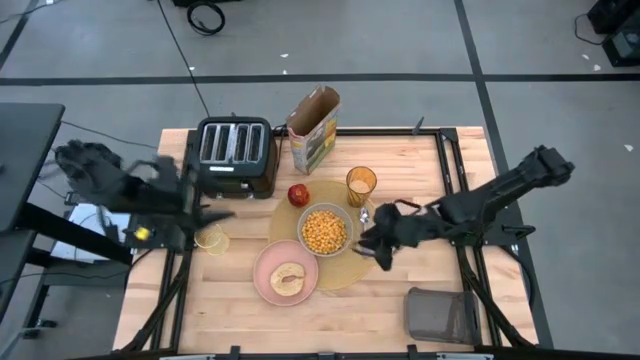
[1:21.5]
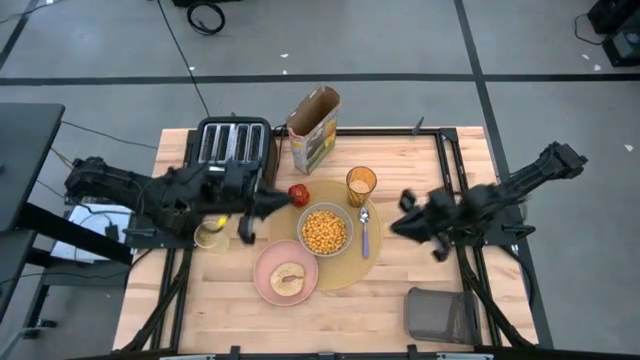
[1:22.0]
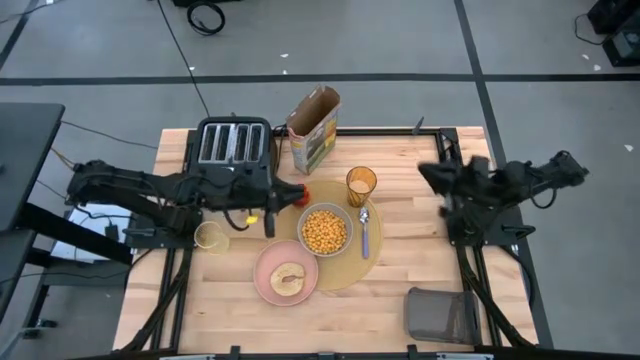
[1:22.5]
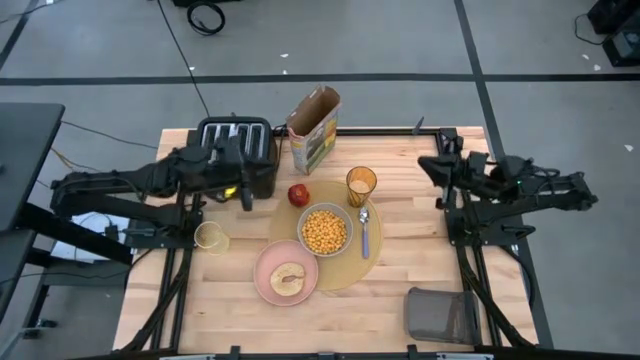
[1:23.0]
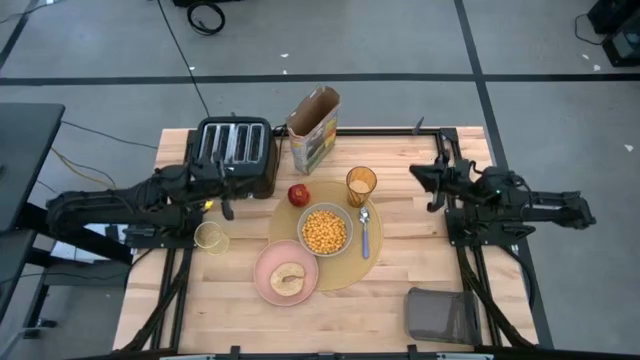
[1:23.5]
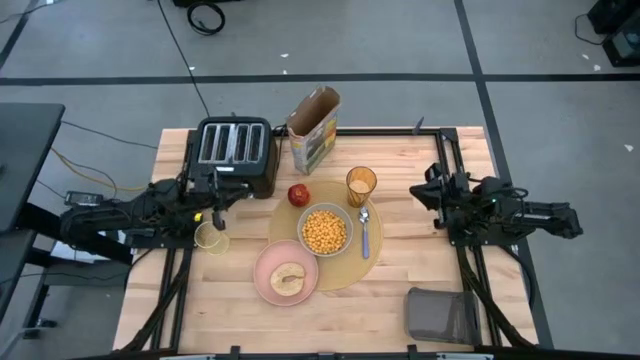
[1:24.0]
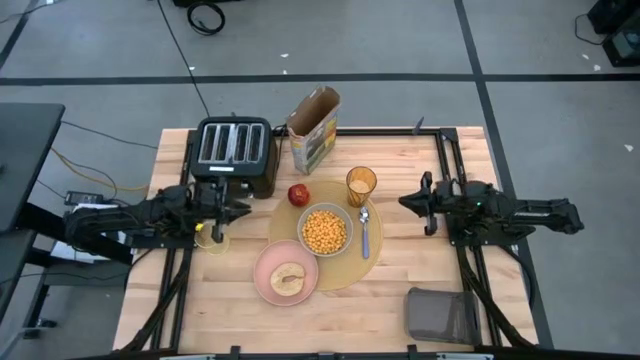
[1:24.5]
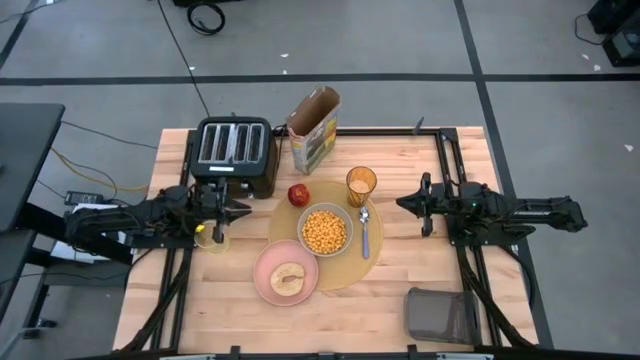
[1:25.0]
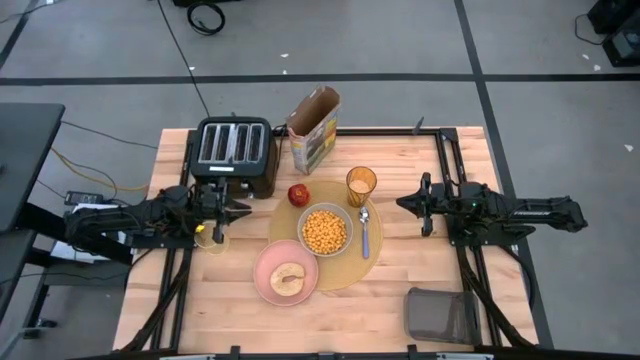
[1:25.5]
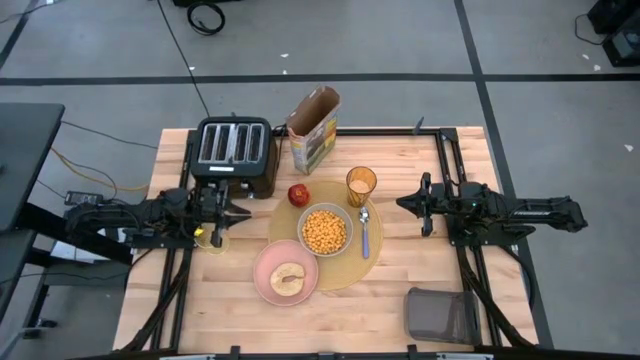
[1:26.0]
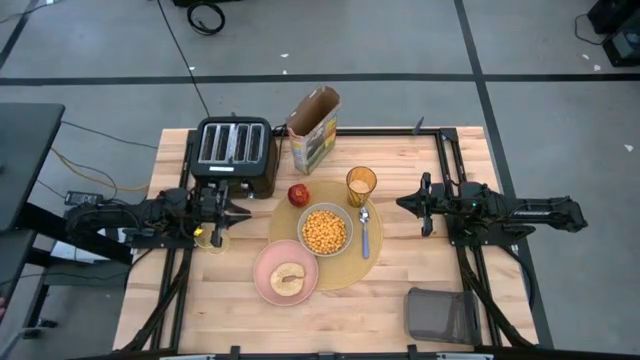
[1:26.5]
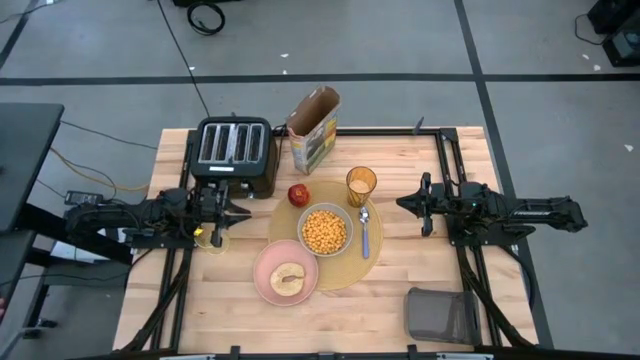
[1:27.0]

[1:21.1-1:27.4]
Task: Arrange a breakfast setting
Return to Home Position

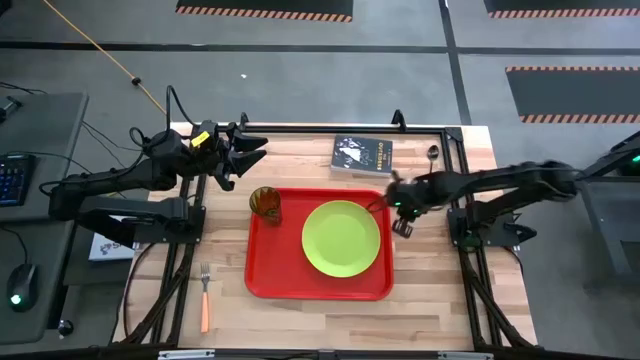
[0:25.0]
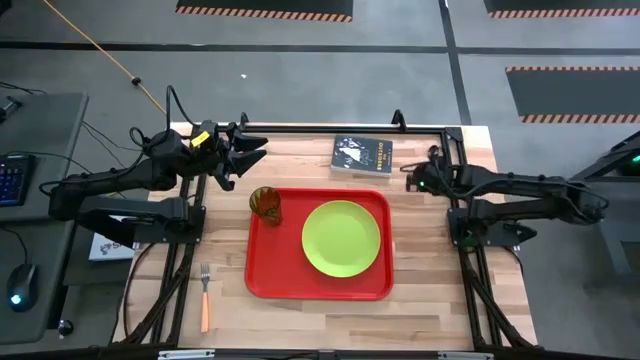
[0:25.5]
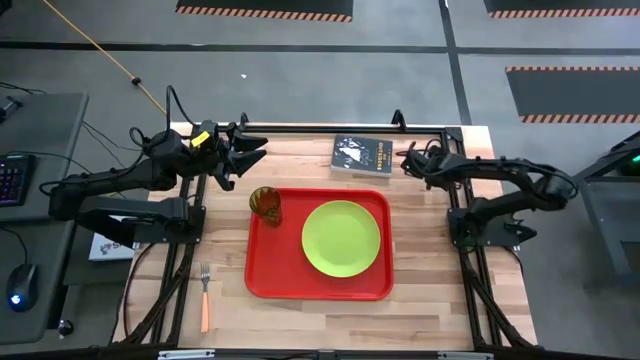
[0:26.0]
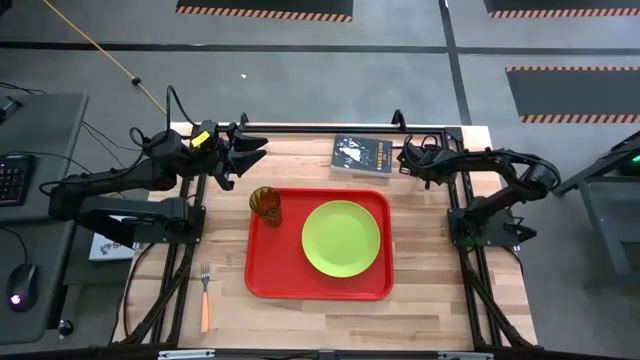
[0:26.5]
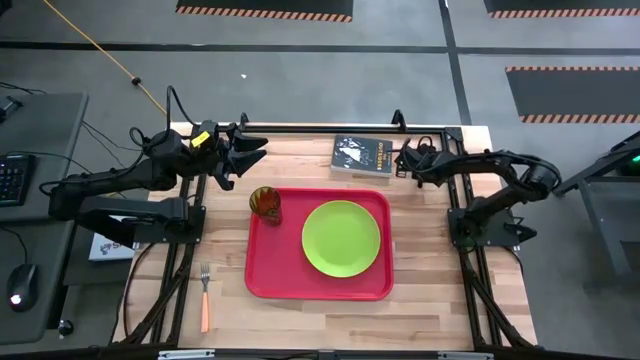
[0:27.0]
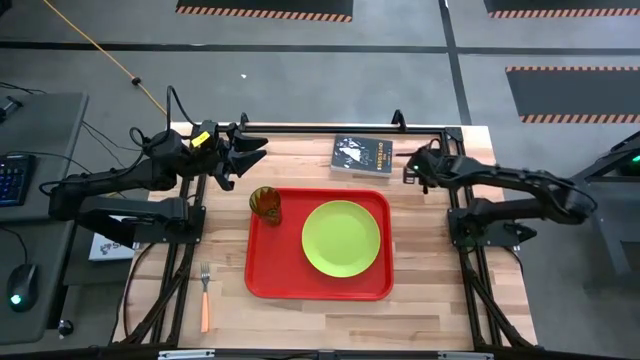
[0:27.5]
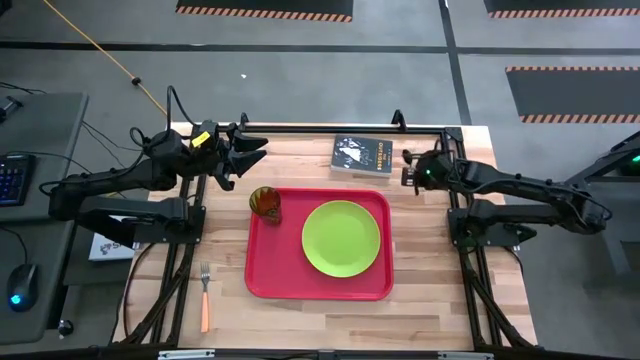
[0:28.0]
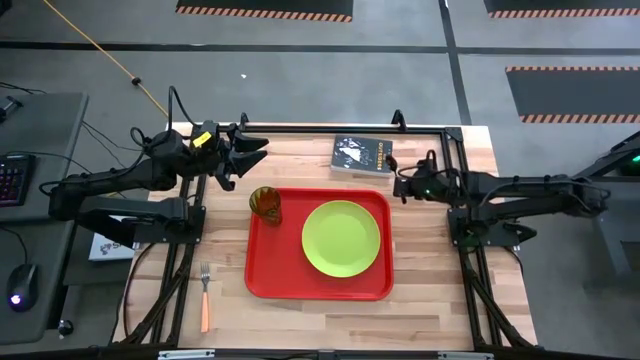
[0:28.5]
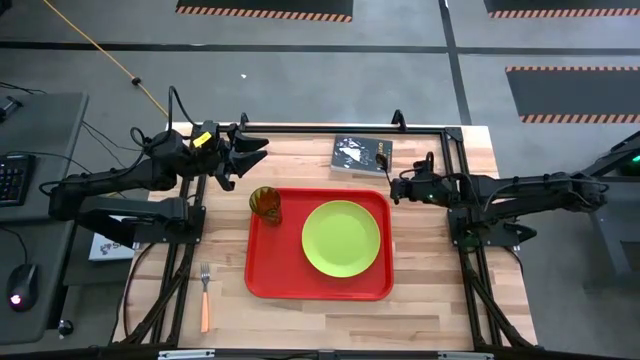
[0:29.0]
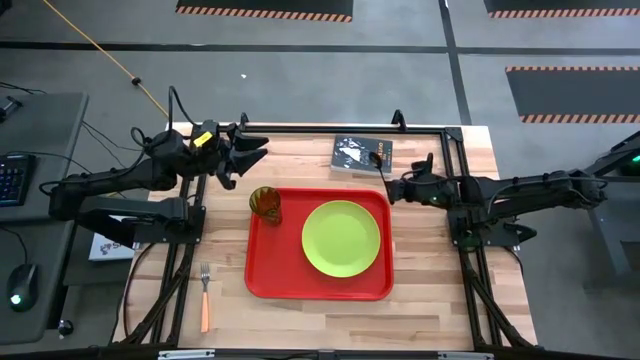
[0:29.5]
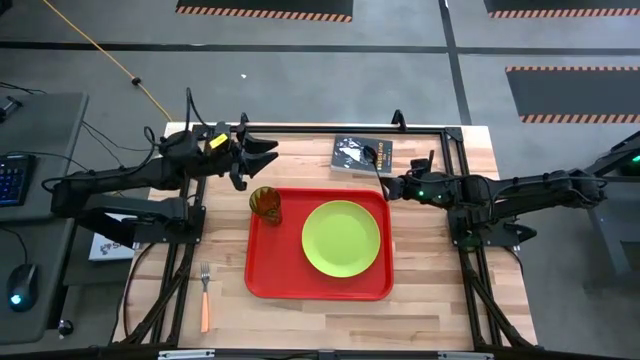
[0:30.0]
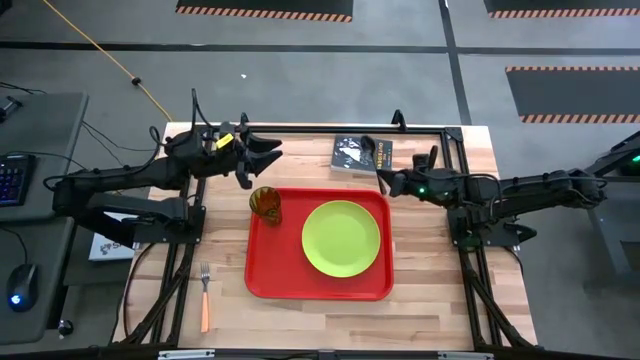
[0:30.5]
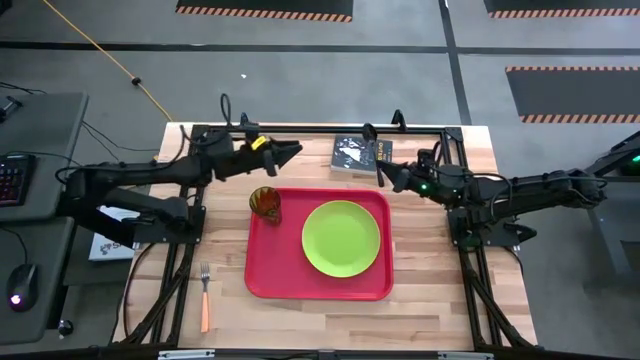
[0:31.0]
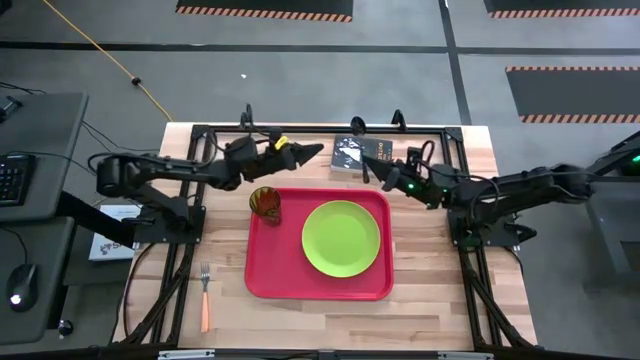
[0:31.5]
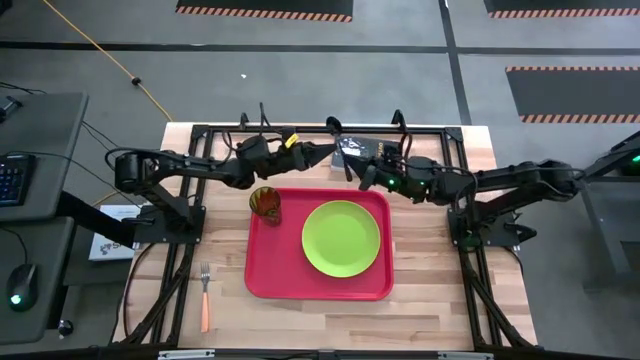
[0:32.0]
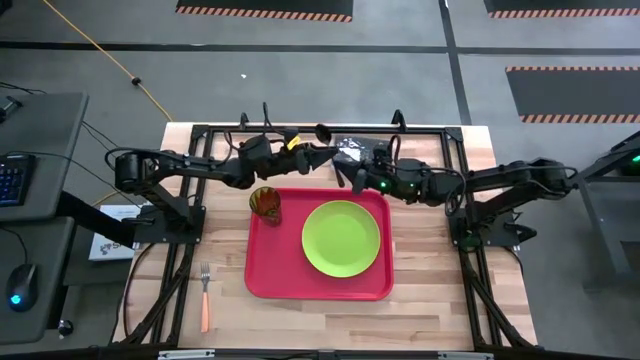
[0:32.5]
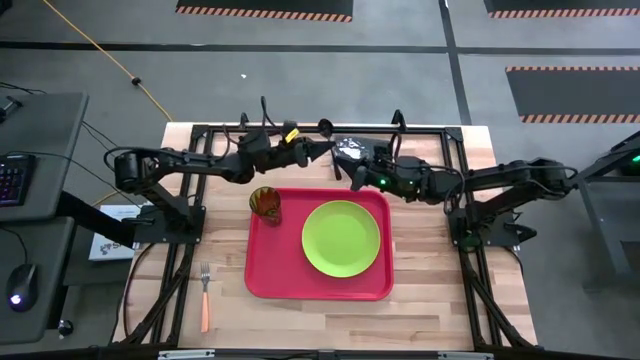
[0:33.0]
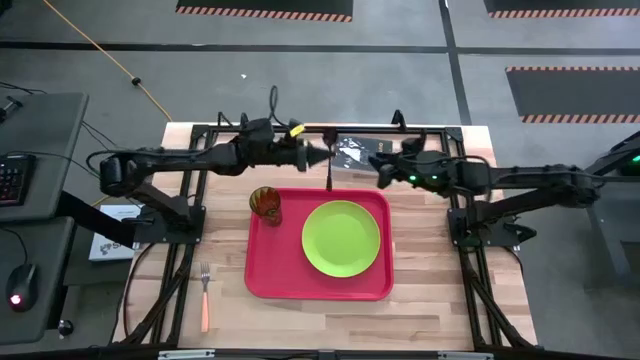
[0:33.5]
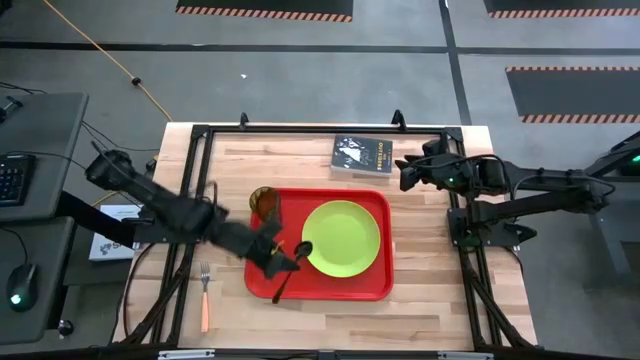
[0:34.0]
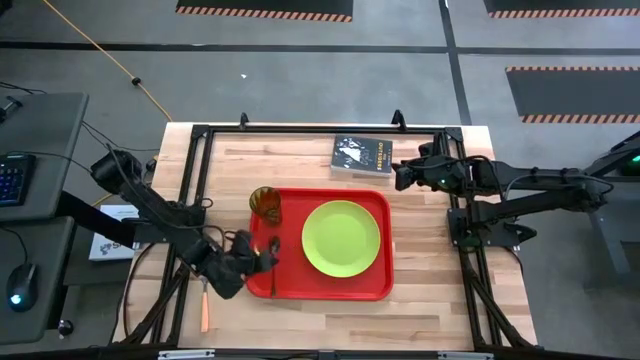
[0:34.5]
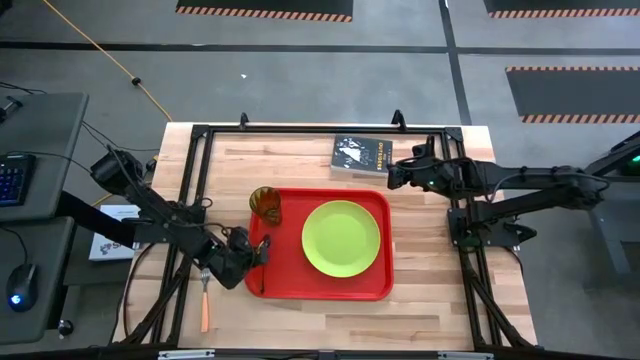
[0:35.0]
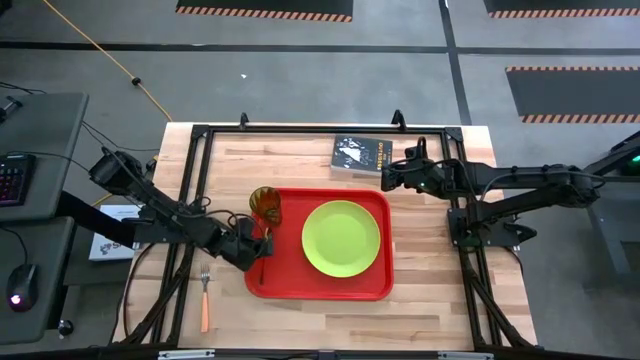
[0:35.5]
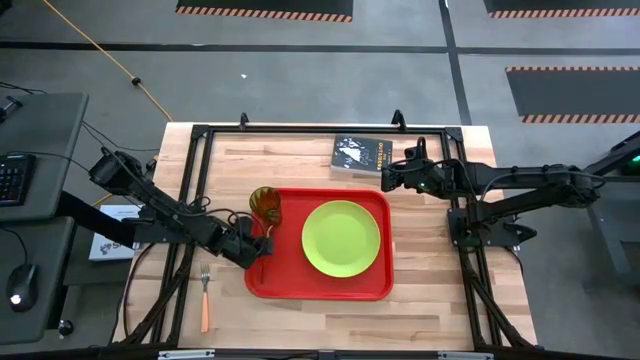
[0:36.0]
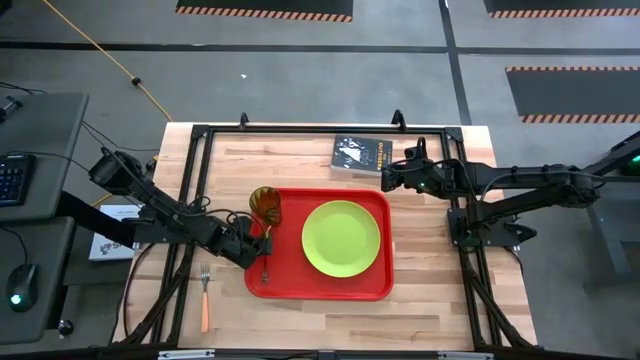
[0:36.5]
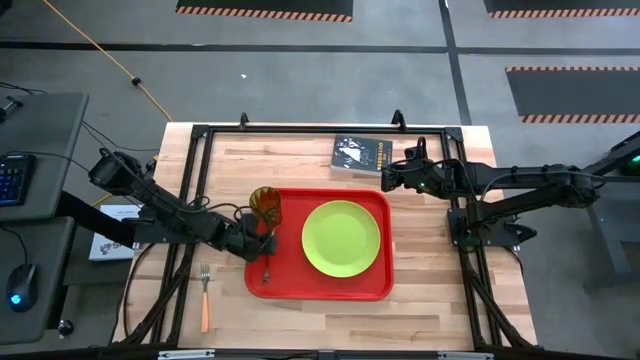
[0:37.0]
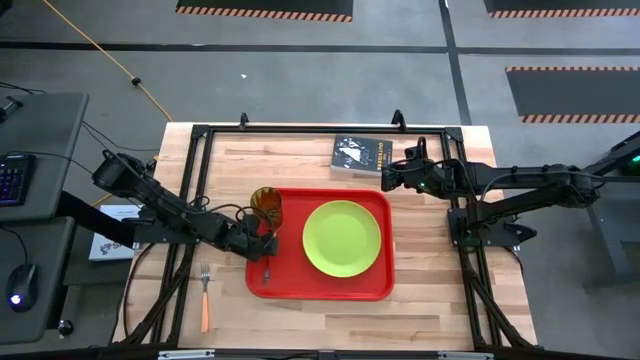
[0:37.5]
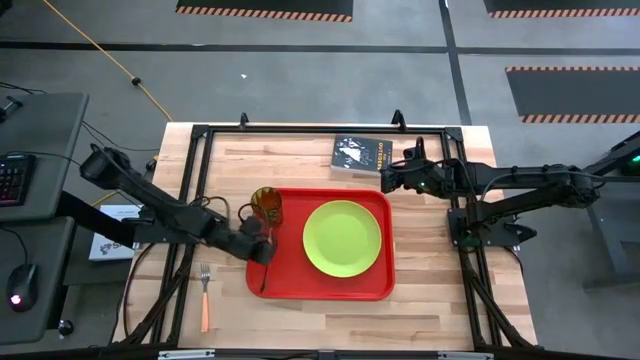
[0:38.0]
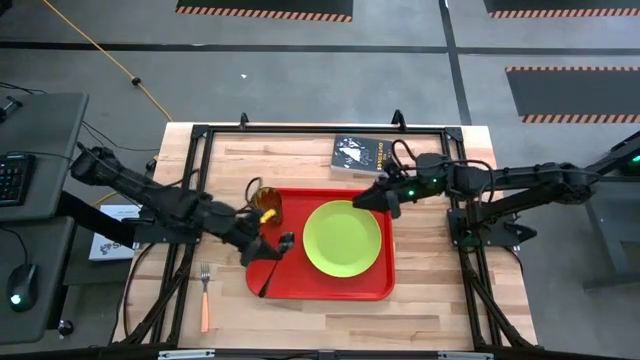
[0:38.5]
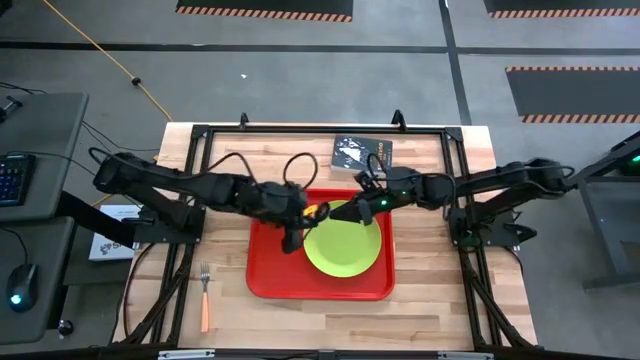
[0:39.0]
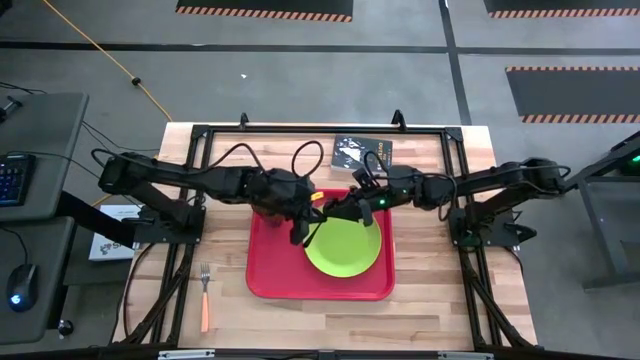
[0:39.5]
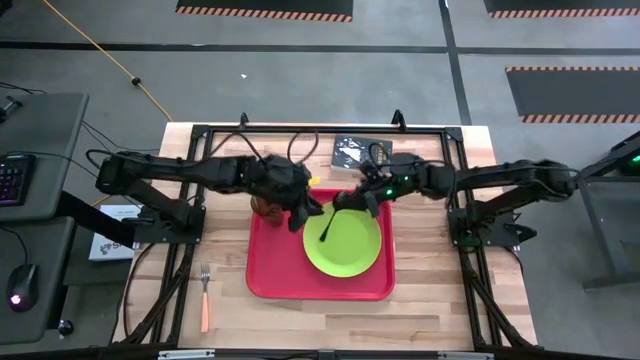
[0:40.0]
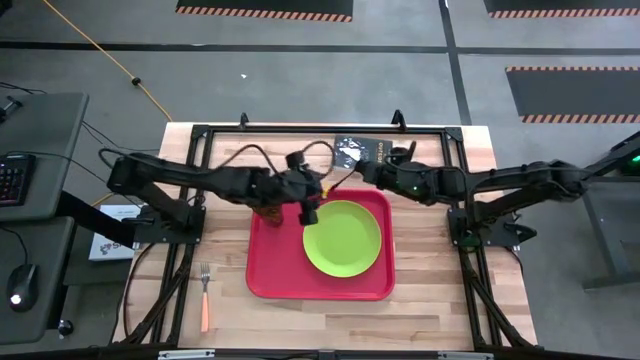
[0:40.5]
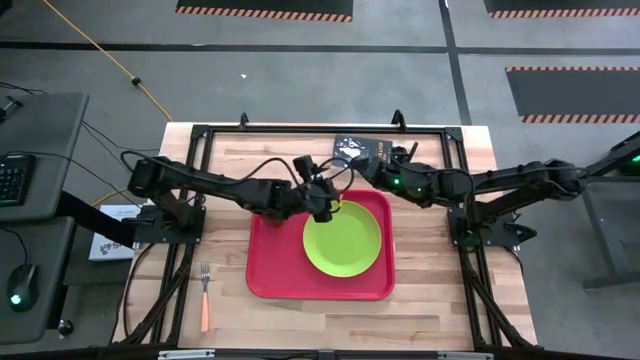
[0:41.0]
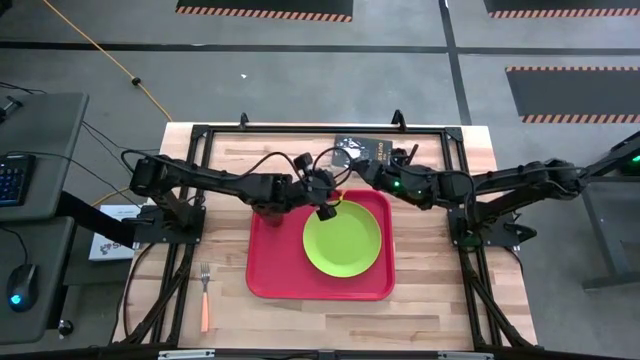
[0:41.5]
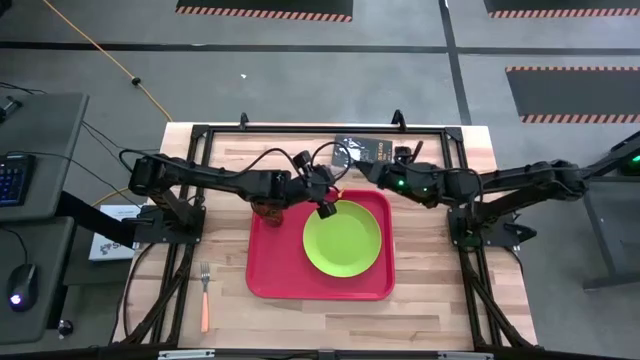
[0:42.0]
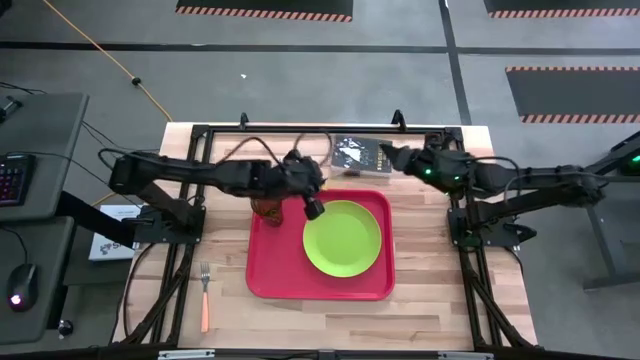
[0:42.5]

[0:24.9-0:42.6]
Task: Pick and place plate/cup/fork/spoon on tray
Put the black spoon on the red tray to the bottom of the green cup
